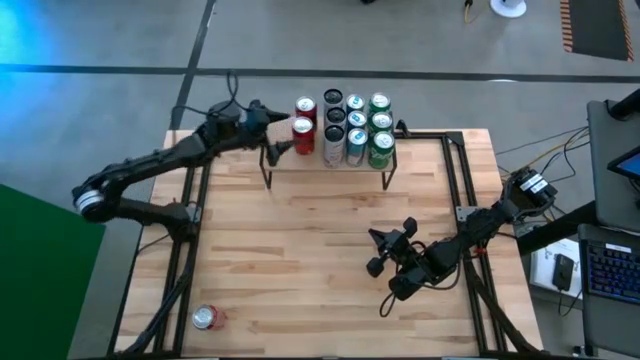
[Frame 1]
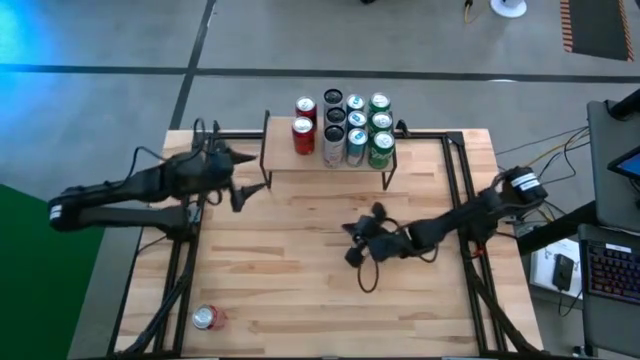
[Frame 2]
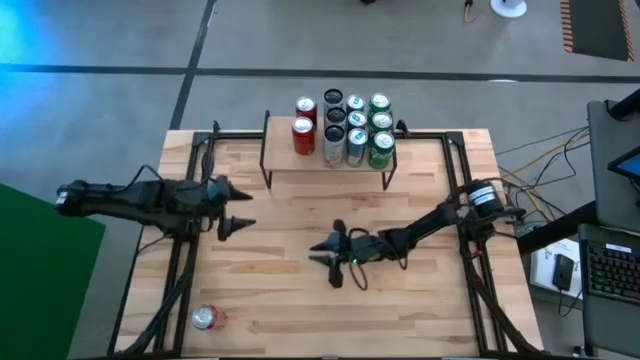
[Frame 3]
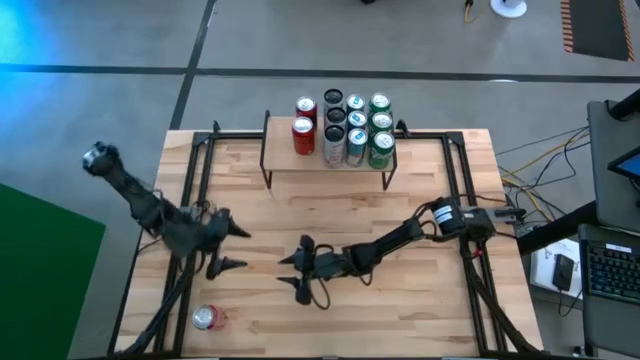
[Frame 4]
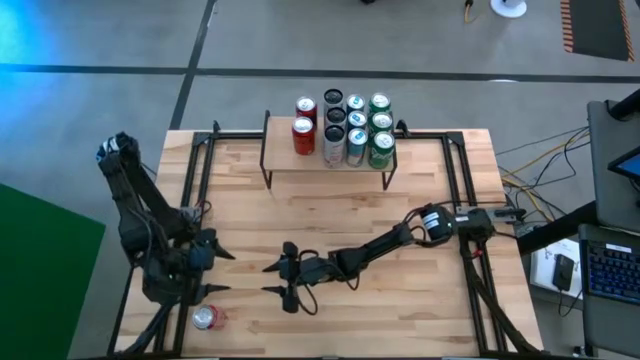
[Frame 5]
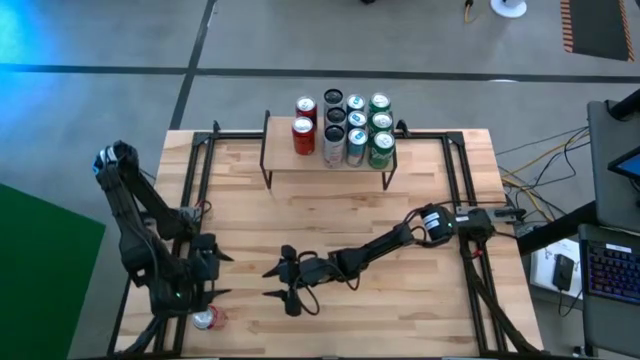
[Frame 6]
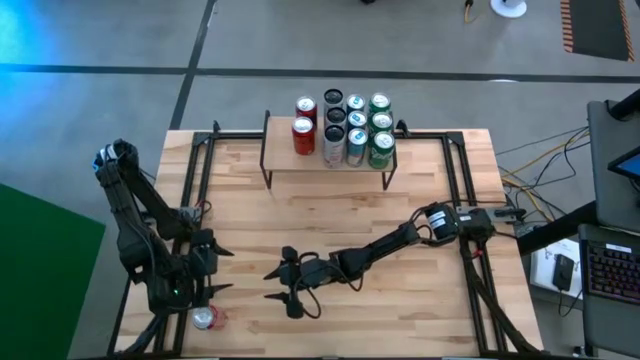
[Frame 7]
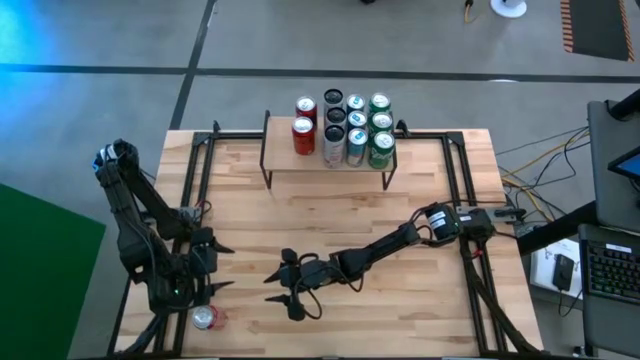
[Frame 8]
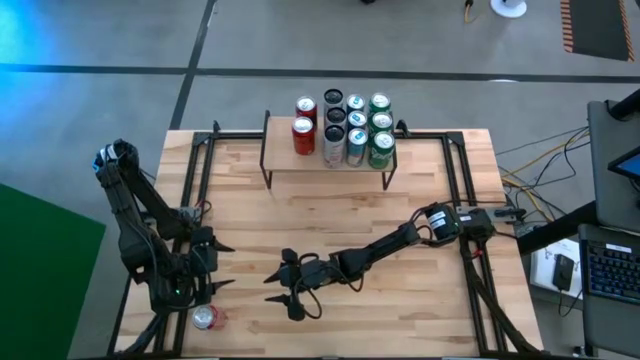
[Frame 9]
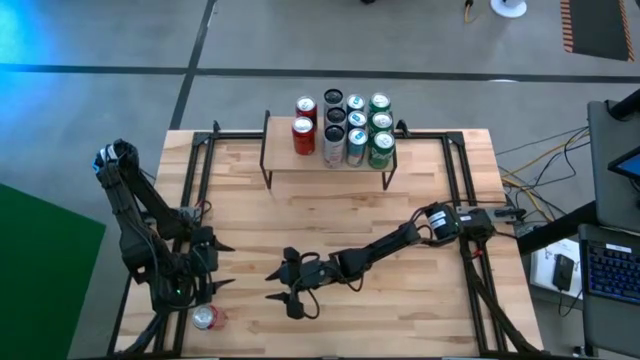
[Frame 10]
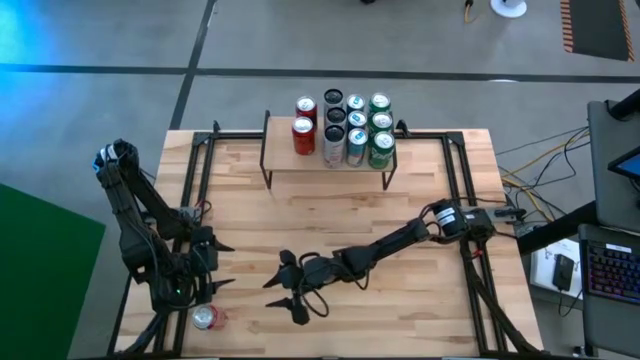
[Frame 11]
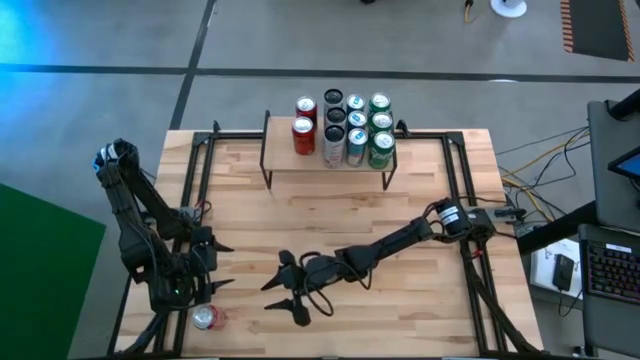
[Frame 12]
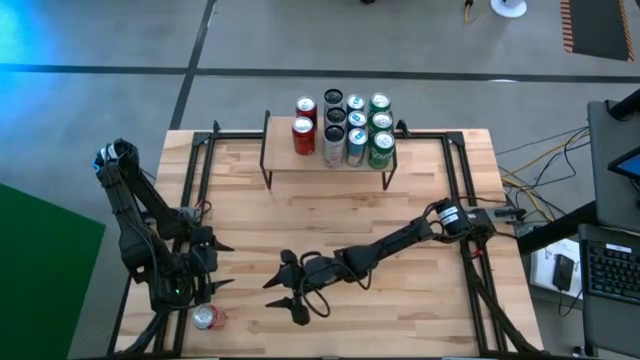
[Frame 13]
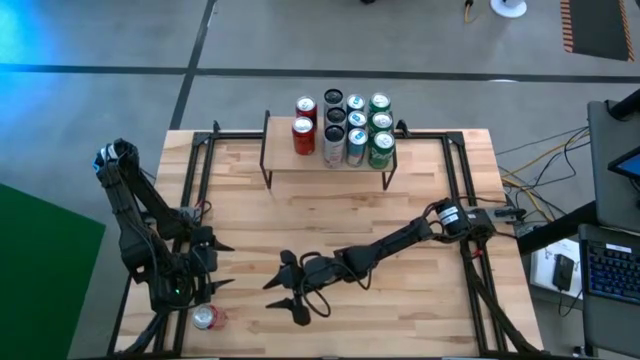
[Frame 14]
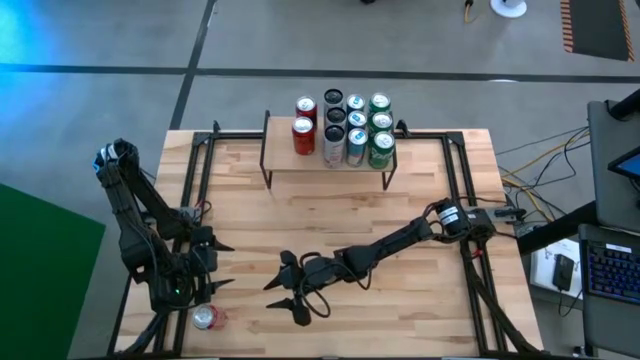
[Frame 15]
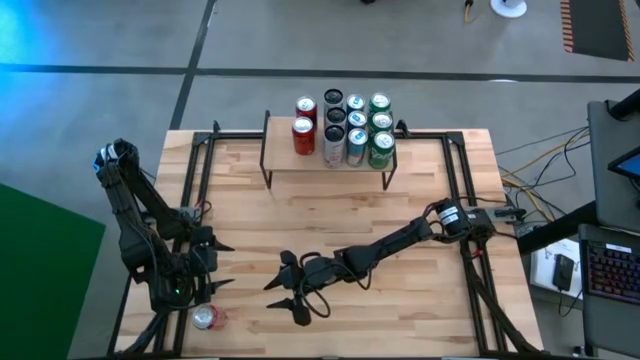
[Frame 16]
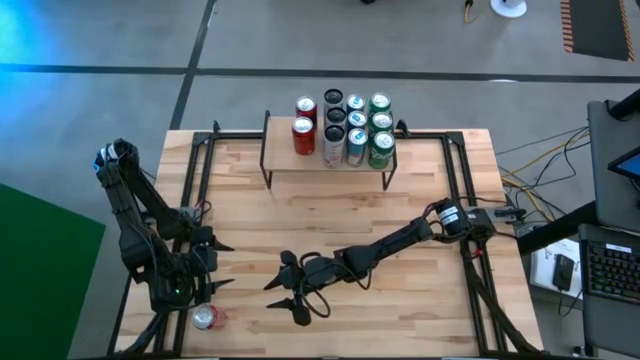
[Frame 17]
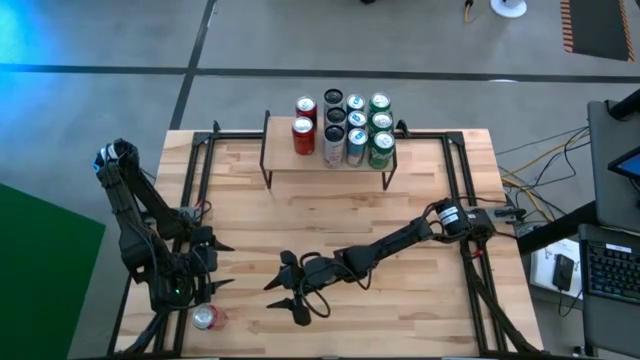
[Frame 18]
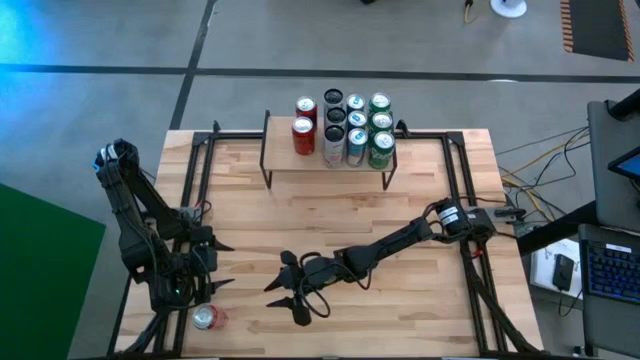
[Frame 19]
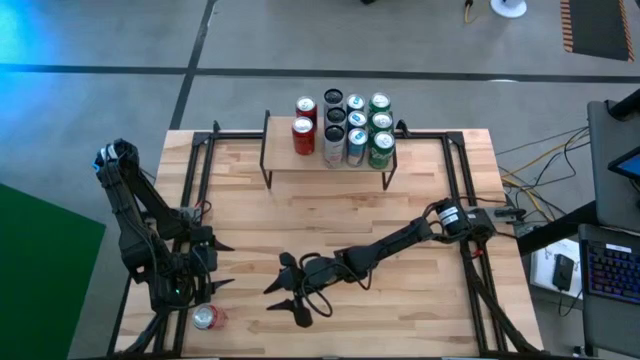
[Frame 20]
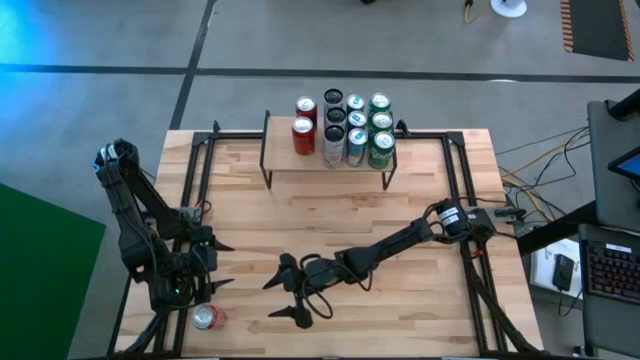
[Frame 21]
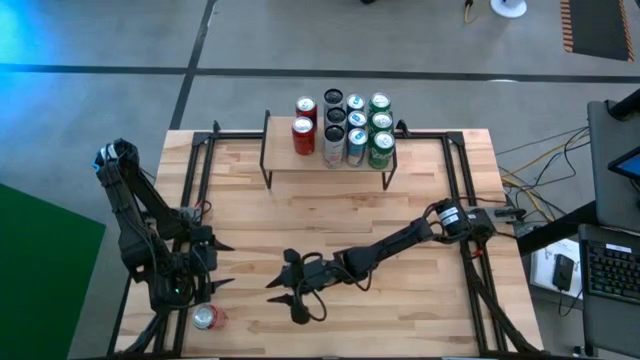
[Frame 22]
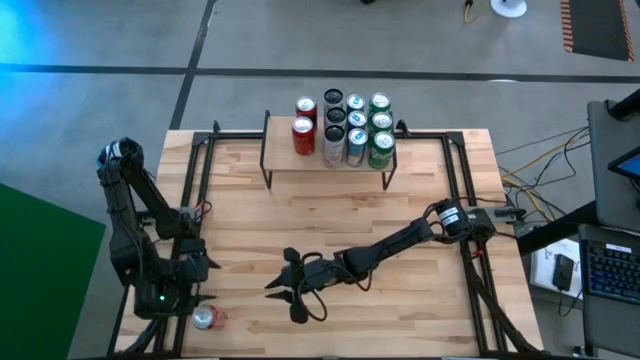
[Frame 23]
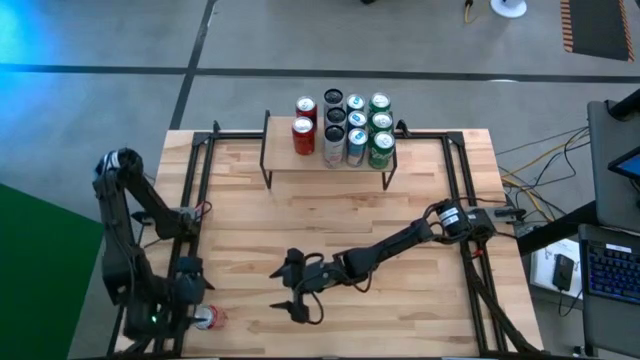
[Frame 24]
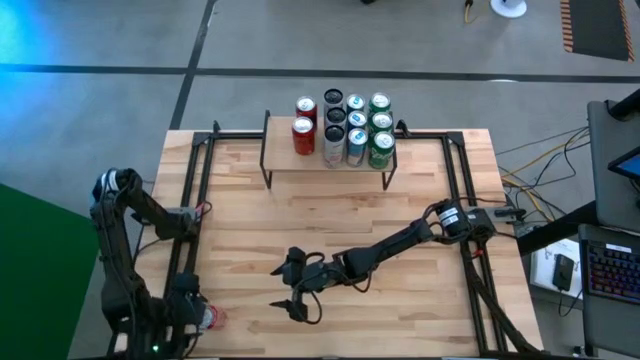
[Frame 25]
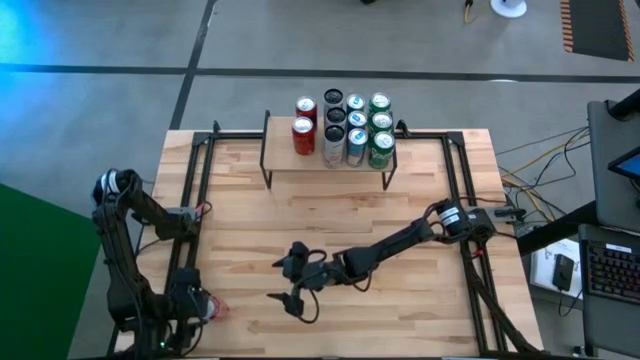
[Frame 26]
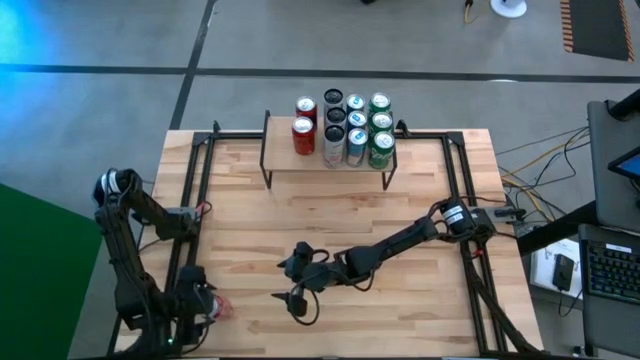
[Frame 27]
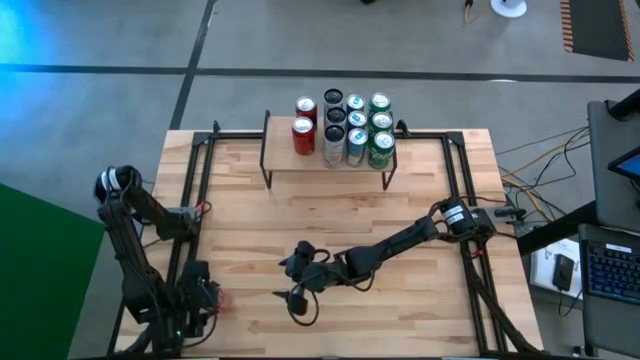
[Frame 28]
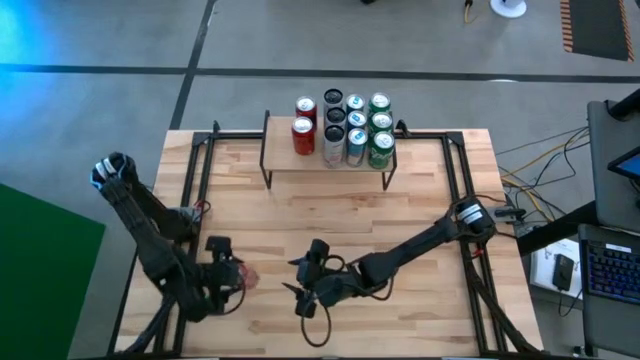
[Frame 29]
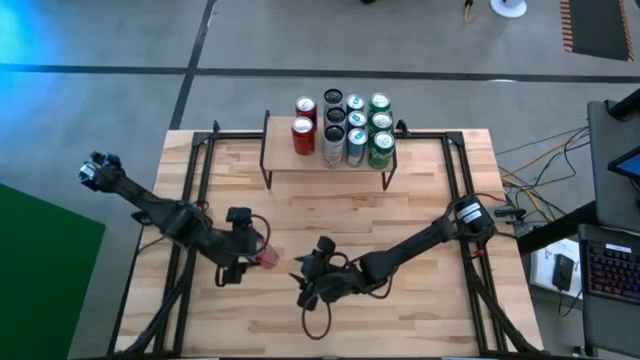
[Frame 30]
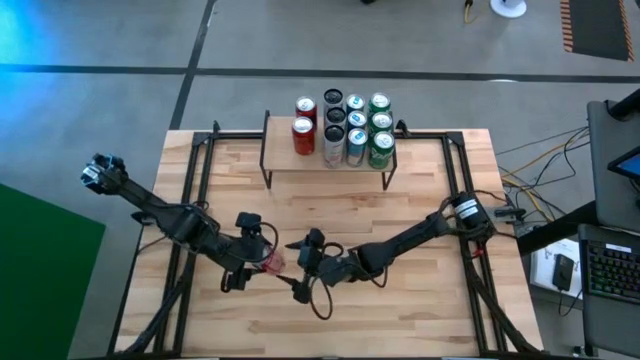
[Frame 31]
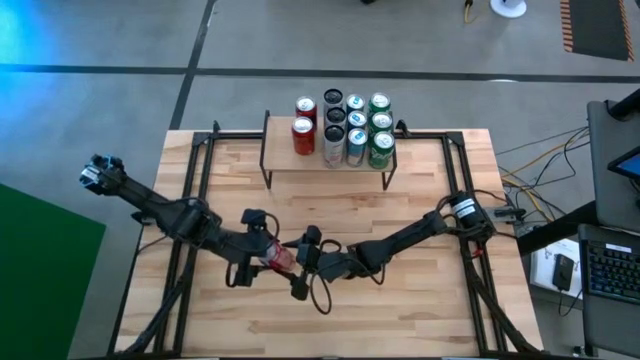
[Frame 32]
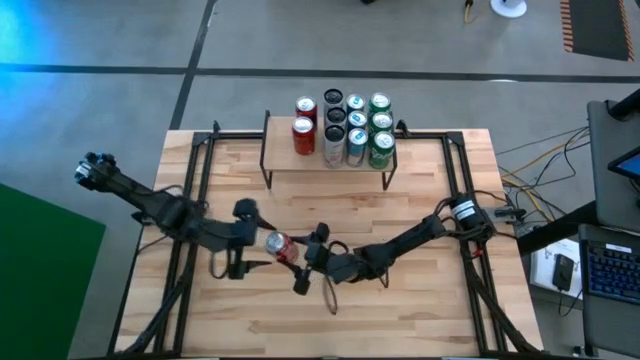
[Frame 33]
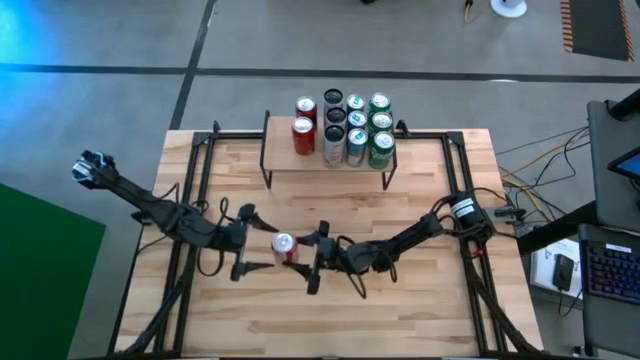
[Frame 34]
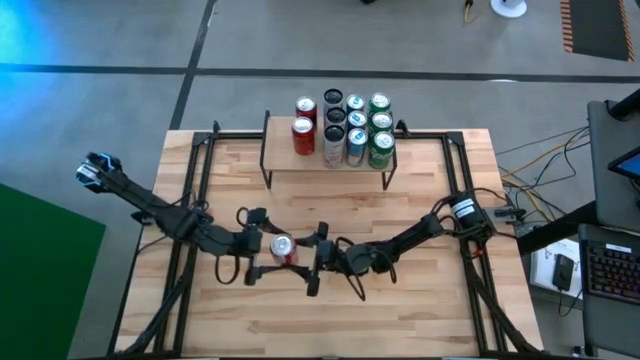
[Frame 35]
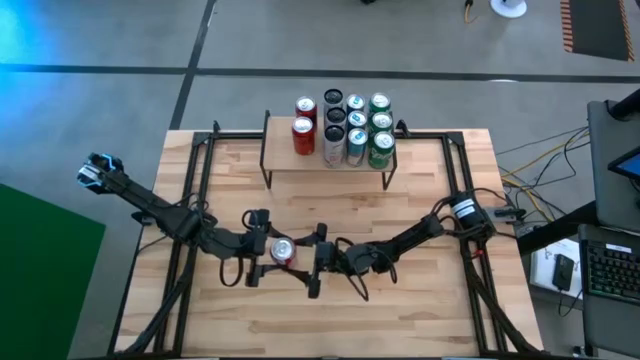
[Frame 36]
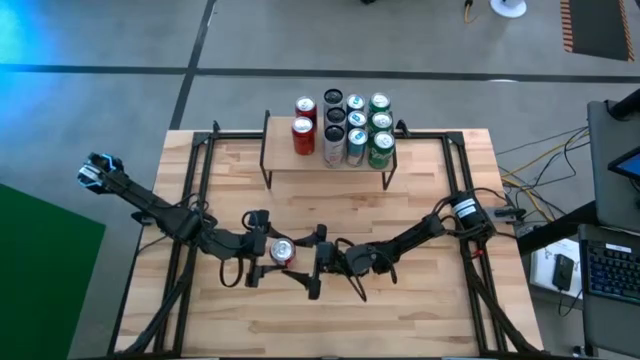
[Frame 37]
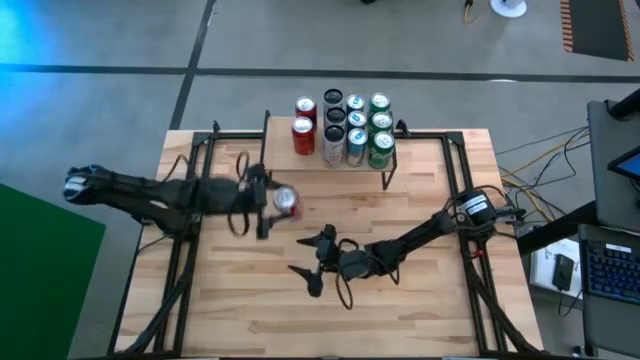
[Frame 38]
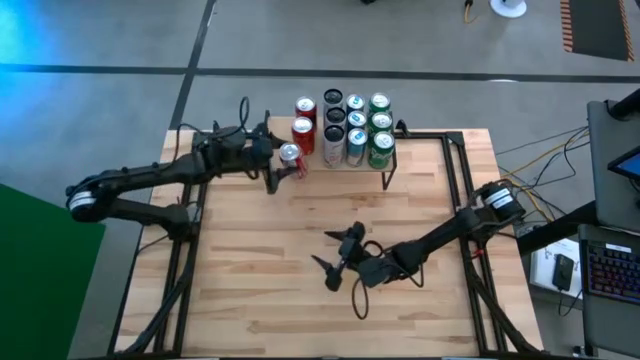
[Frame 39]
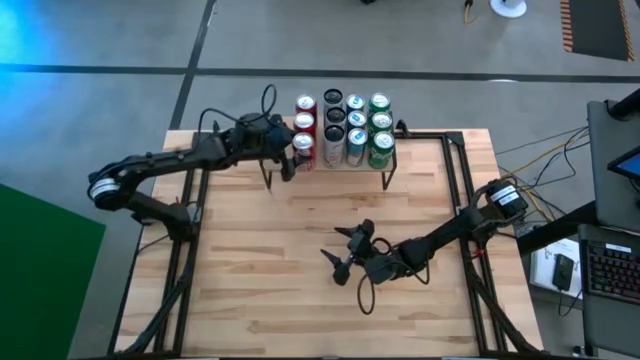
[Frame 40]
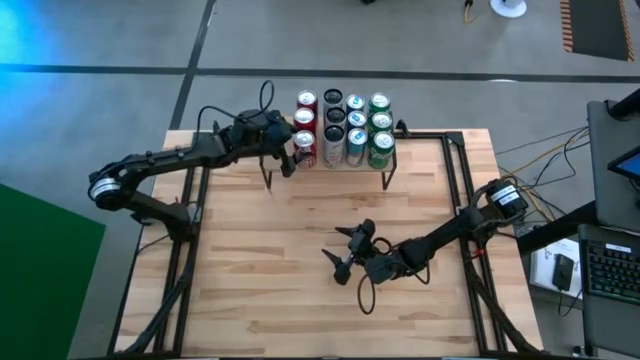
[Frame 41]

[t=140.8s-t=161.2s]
Task: Place canned beverage on shelf
Put the red soda can on the shelf aligned with the other red soda cans
